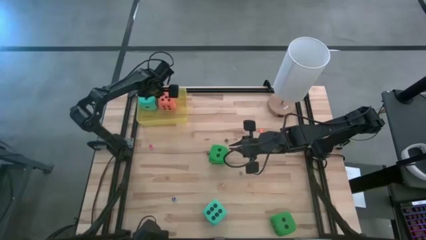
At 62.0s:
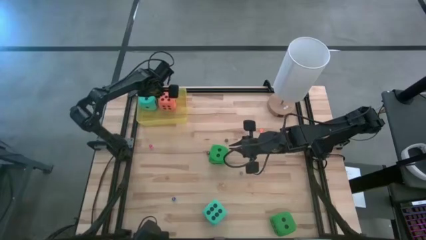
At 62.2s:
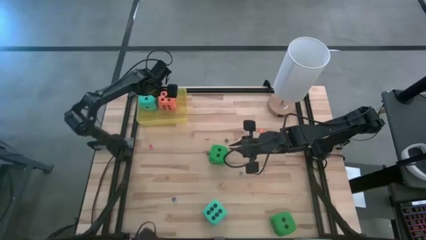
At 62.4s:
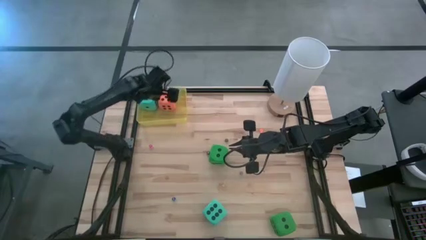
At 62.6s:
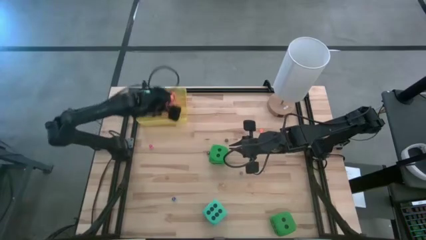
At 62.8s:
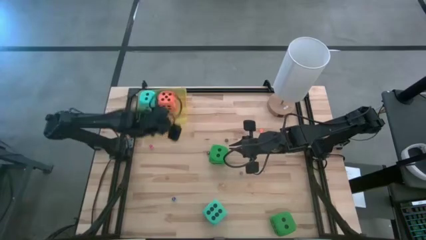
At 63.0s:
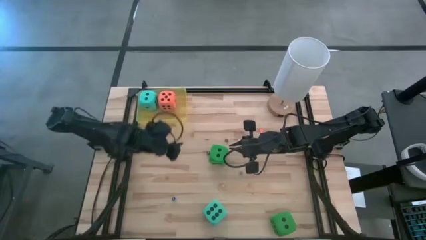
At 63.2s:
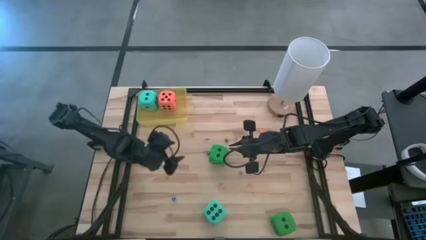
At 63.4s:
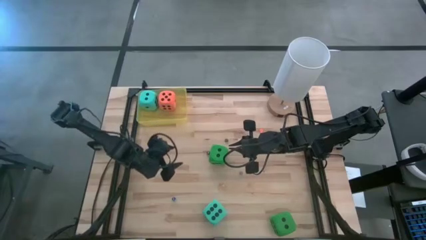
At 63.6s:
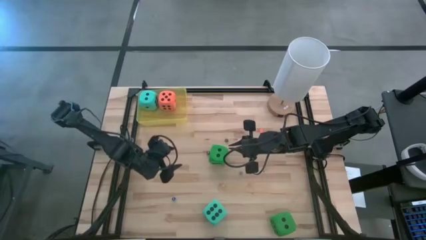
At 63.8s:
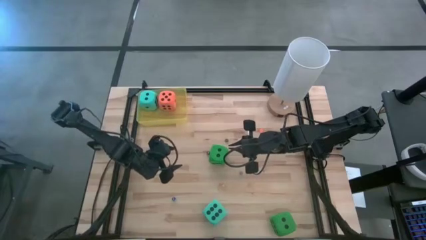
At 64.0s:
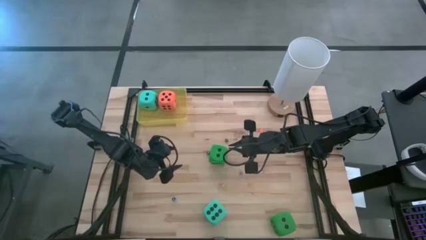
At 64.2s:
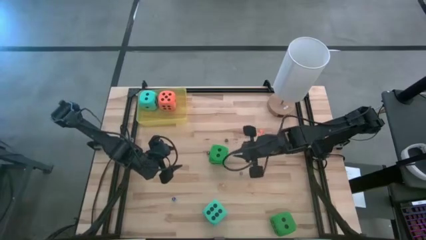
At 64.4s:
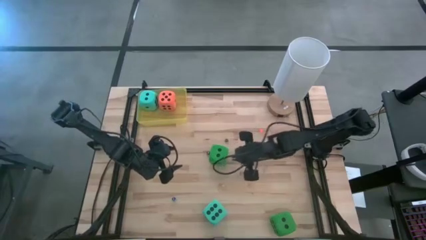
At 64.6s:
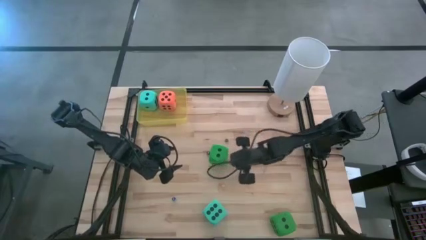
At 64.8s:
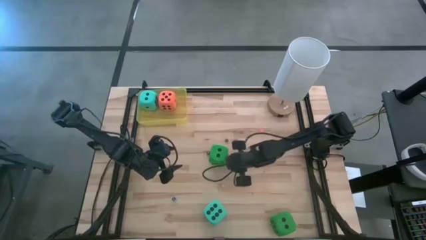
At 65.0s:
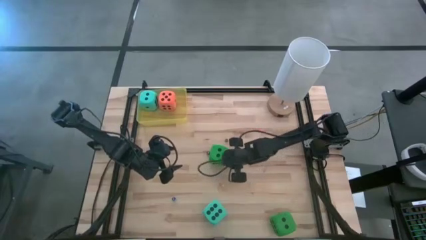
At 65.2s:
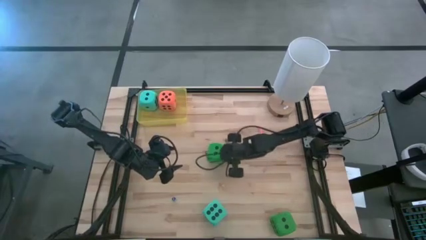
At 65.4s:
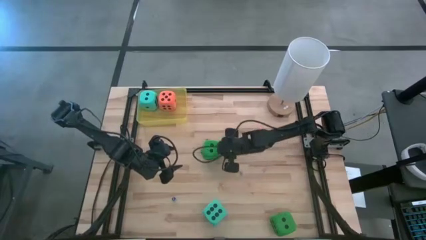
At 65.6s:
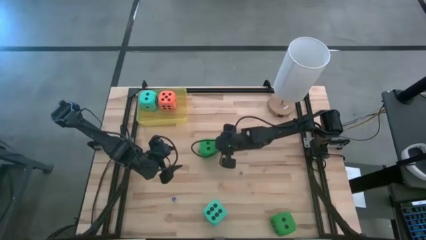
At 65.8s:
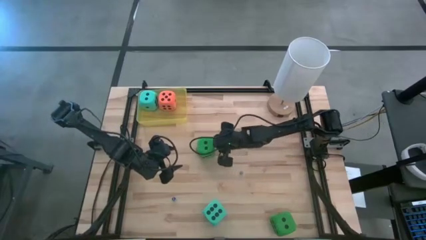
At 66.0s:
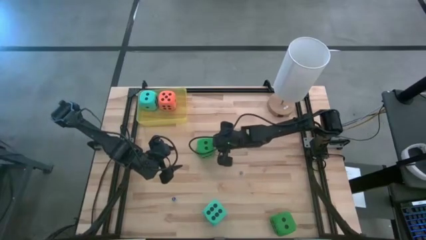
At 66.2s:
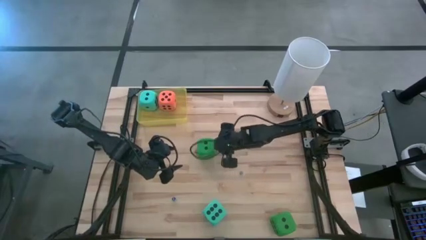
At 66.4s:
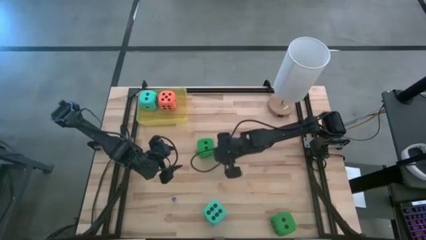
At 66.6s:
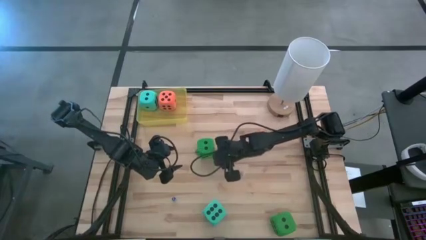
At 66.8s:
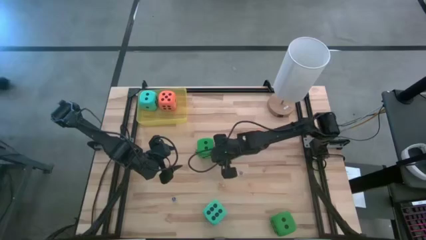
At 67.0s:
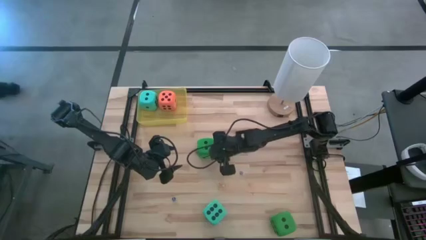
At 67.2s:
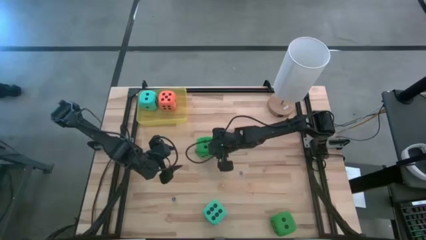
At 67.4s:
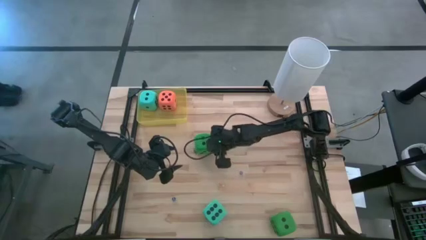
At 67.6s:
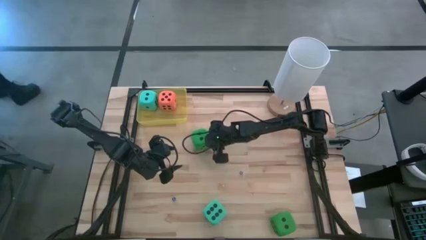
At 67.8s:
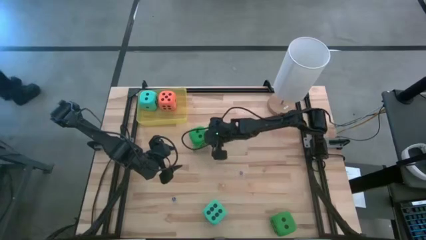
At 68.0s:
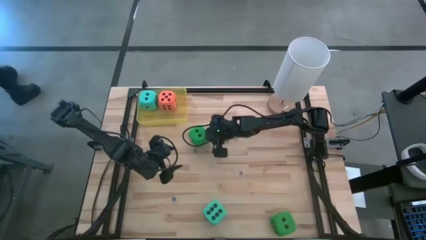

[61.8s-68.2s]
Task: Pick & Place Dice
Adjust the top green large die

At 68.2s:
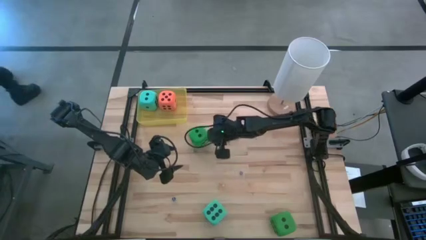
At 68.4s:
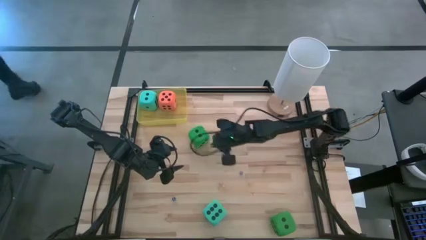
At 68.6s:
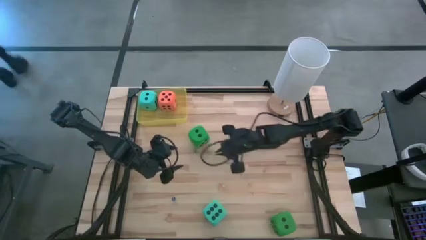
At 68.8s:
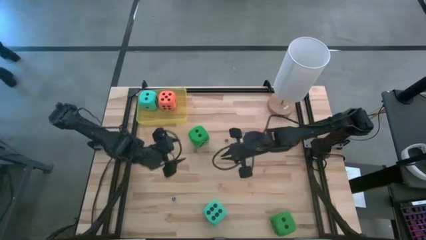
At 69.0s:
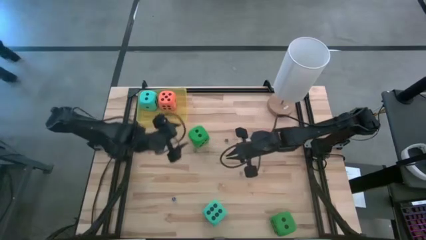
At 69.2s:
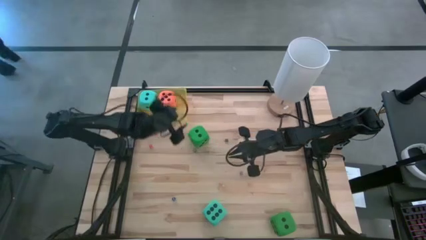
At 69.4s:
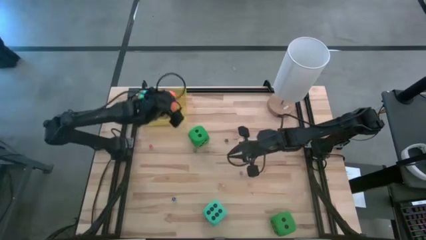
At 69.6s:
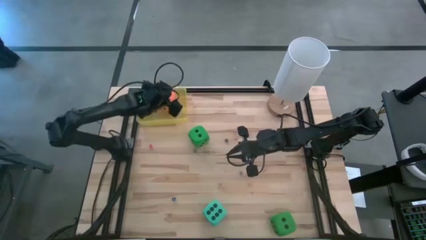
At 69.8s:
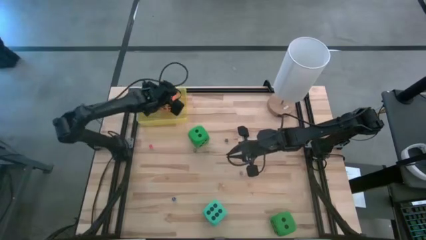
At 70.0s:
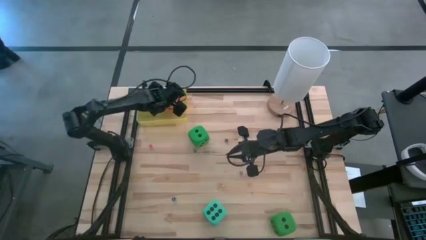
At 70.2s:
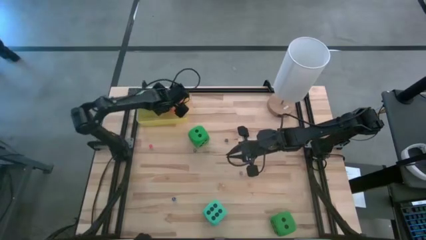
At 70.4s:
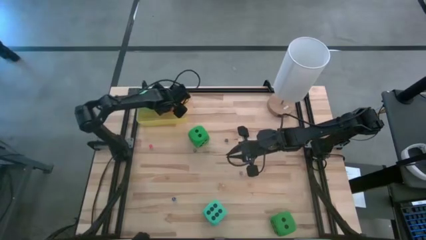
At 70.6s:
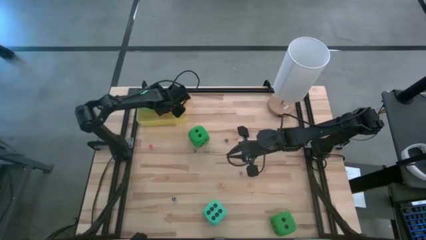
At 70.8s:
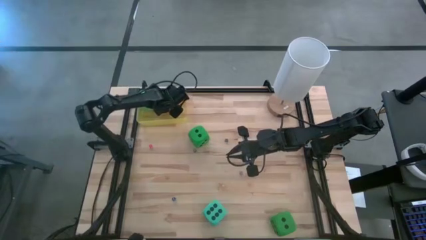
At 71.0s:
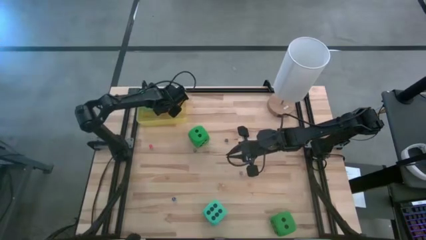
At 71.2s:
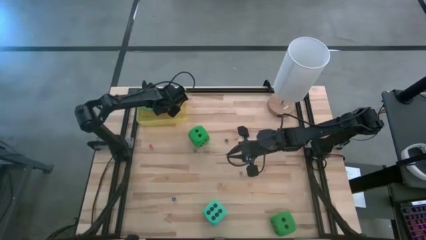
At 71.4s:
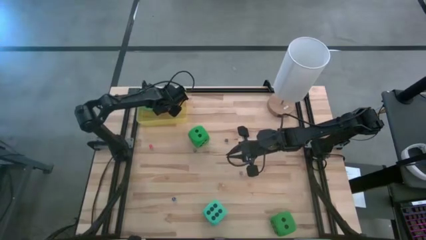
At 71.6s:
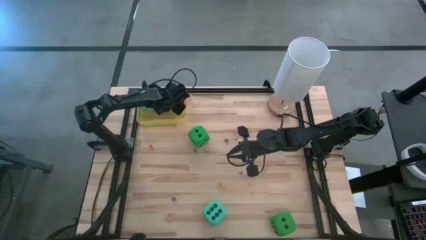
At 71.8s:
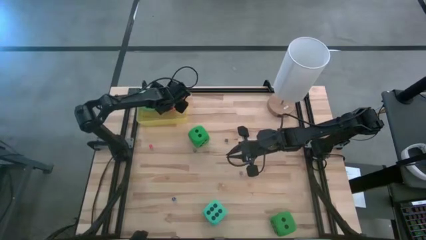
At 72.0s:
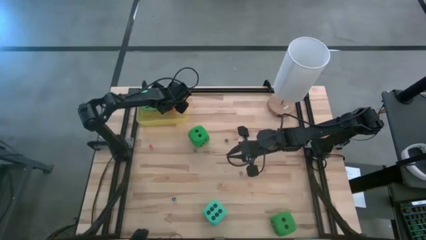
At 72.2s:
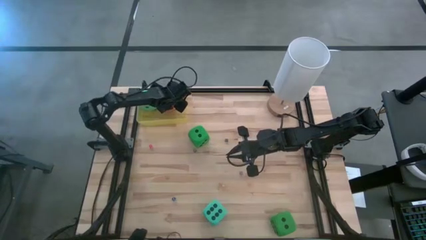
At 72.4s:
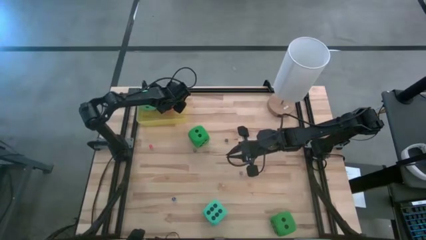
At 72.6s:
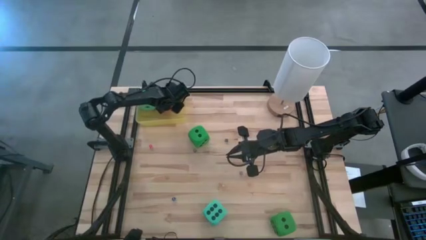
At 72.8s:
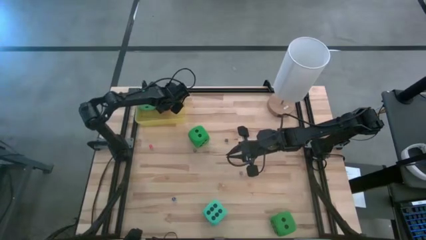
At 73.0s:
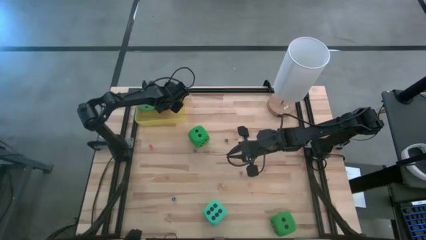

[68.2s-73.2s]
Adjust the orange large die in the yellow container

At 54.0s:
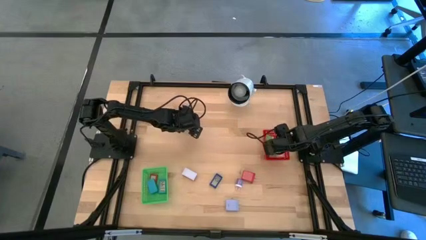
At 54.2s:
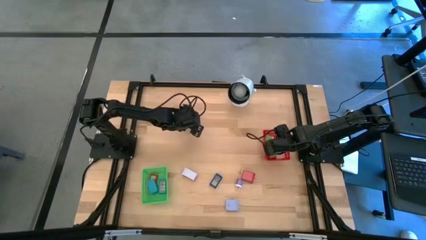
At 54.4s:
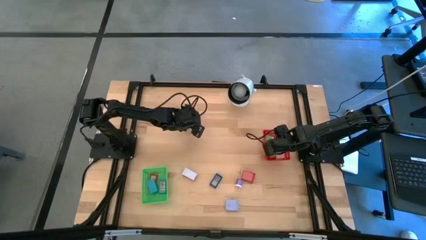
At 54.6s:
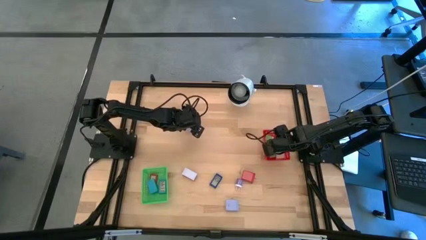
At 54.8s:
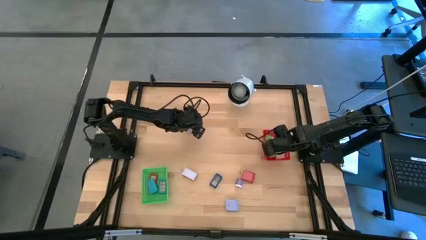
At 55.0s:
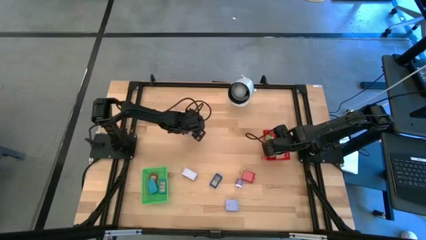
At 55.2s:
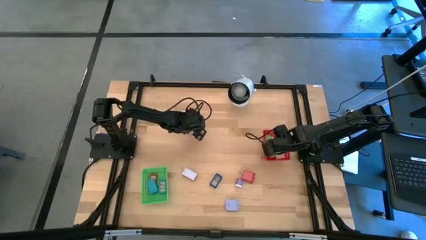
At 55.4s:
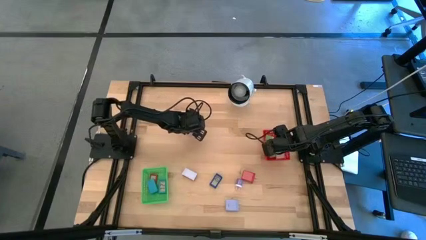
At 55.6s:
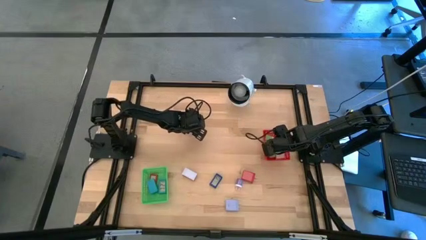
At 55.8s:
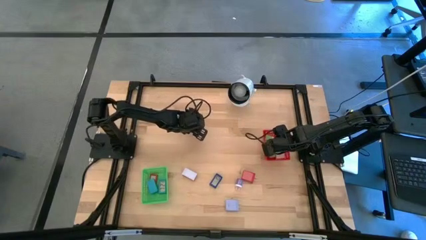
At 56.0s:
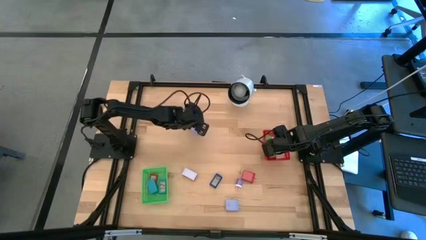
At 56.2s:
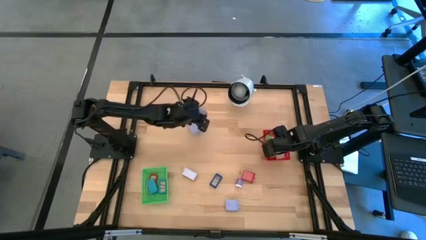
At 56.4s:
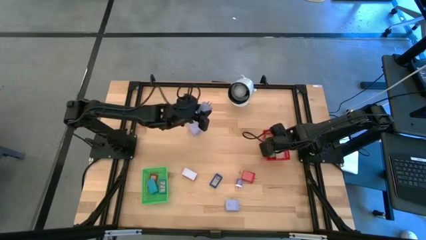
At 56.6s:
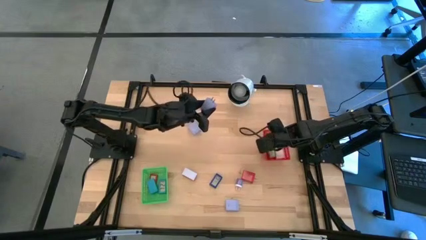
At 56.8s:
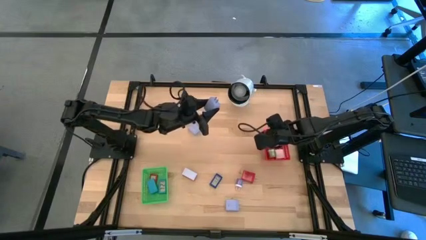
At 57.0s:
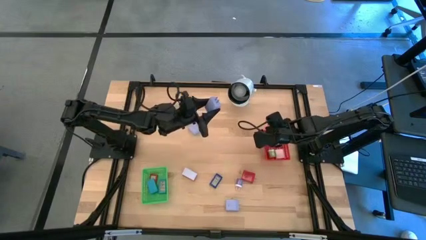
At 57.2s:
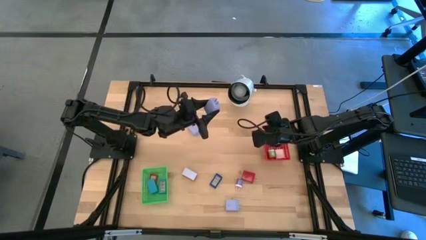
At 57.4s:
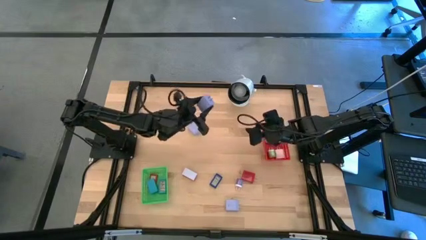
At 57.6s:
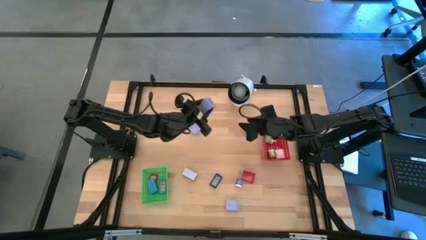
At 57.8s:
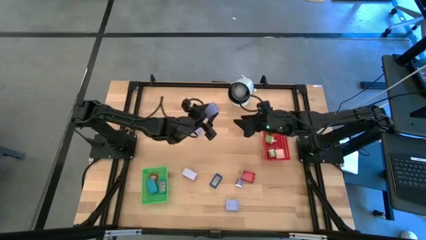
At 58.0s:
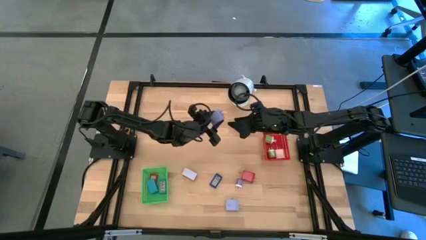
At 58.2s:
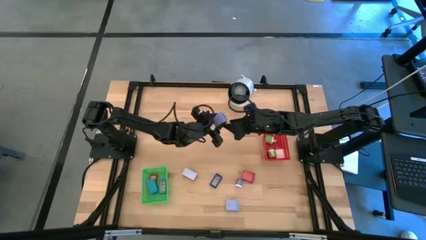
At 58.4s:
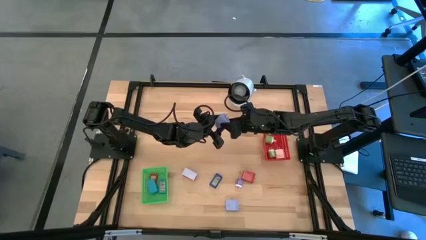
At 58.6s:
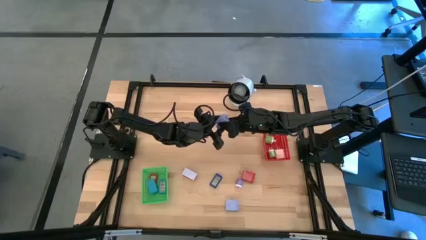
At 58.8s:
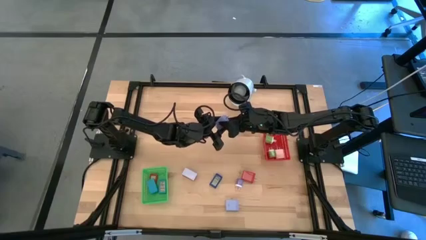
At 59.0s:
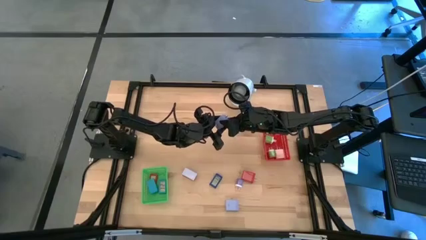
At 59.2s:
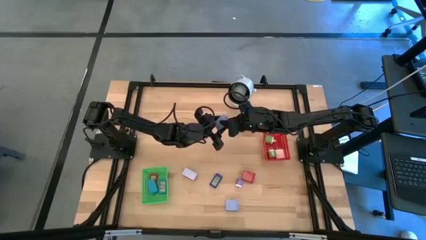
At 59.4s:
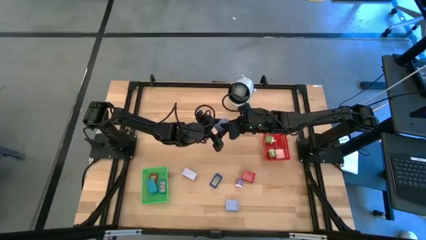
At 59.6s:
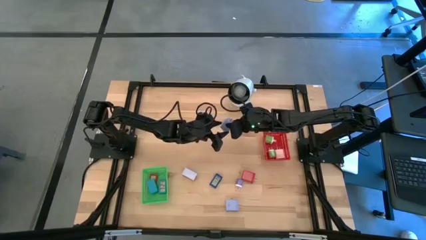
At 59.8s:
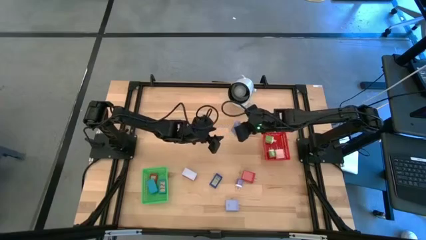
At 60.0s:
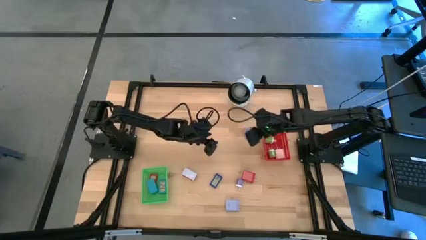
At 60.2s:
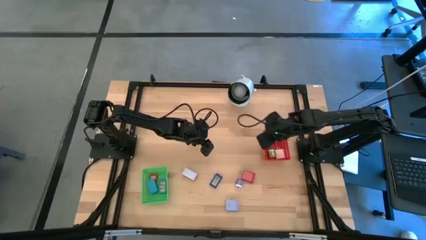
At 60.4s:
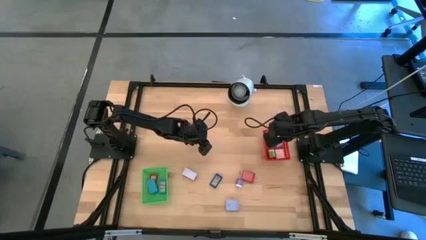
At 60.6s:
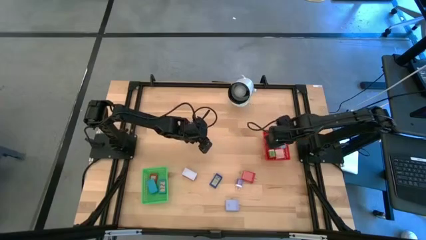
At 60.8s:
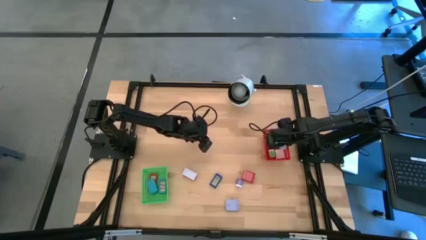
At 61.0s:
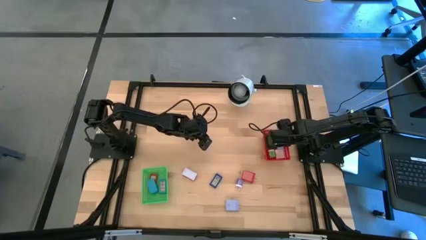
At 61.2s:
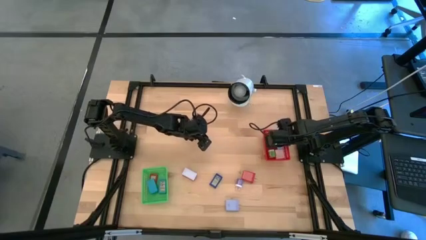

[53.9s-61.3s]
Task: Pick & Place Office items
Put the top light blue charger adapter into the red bin
